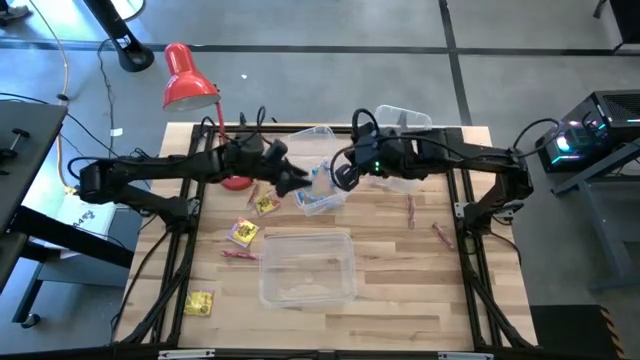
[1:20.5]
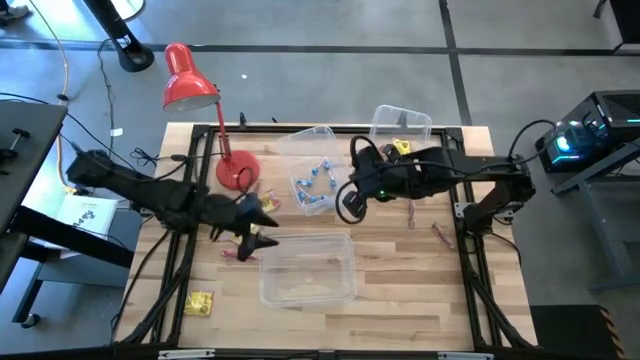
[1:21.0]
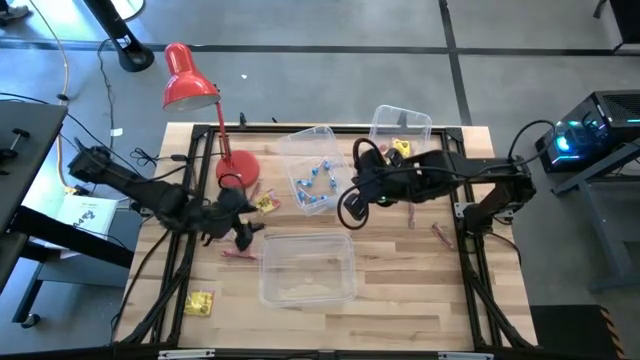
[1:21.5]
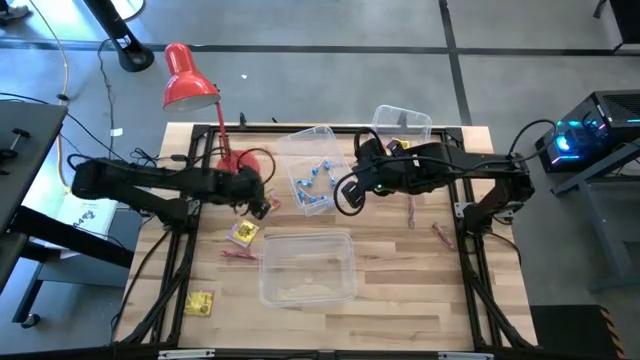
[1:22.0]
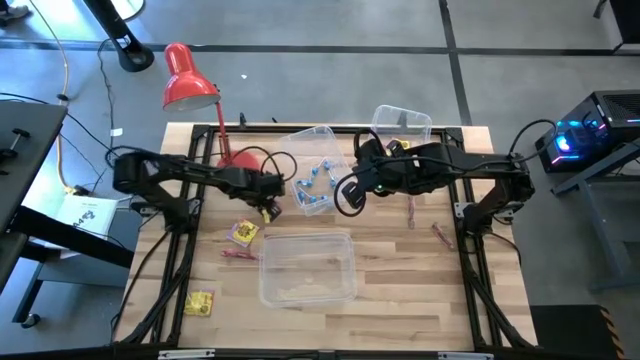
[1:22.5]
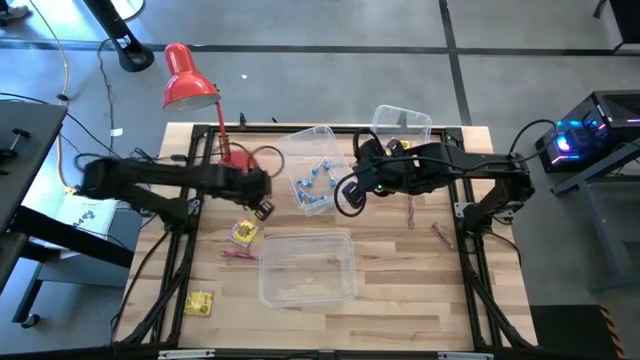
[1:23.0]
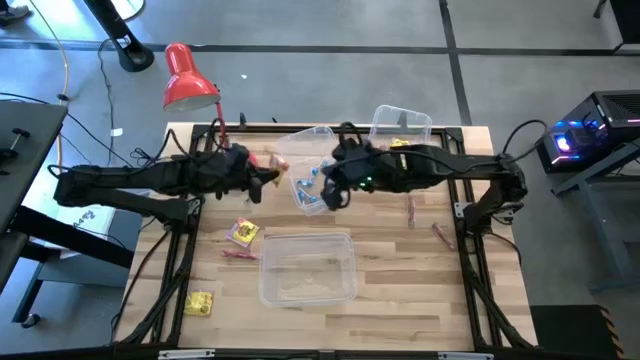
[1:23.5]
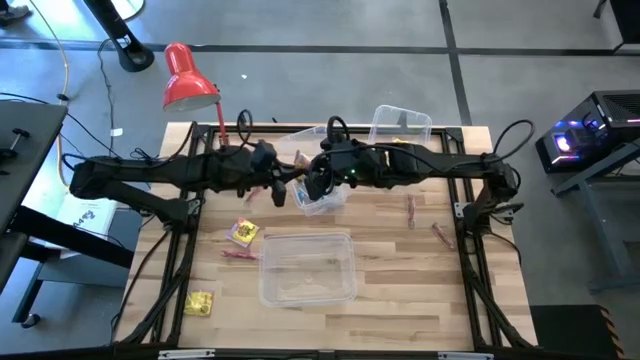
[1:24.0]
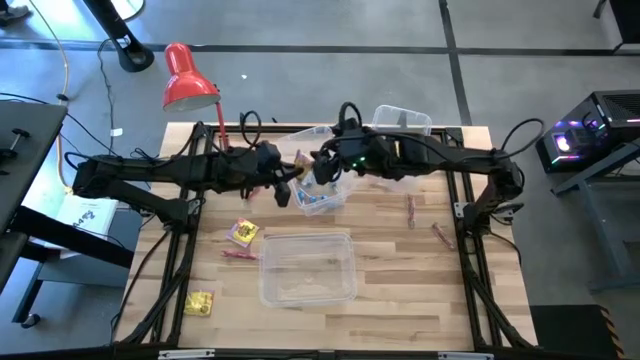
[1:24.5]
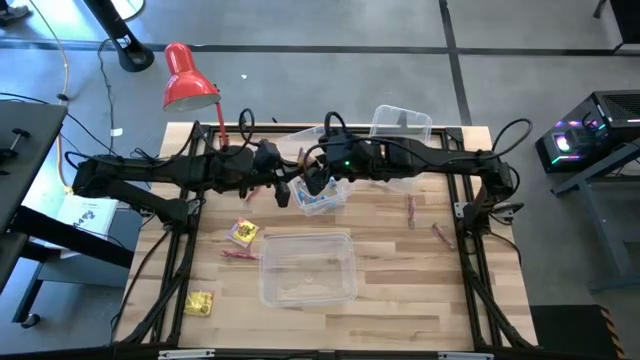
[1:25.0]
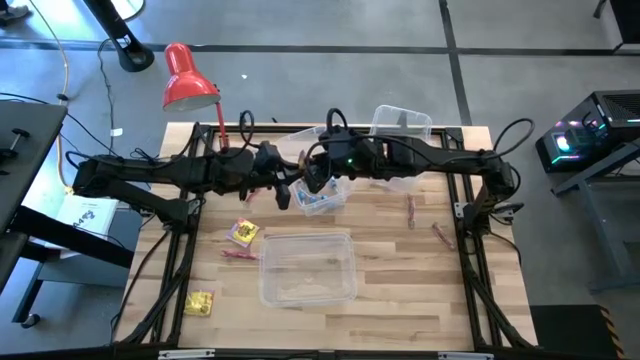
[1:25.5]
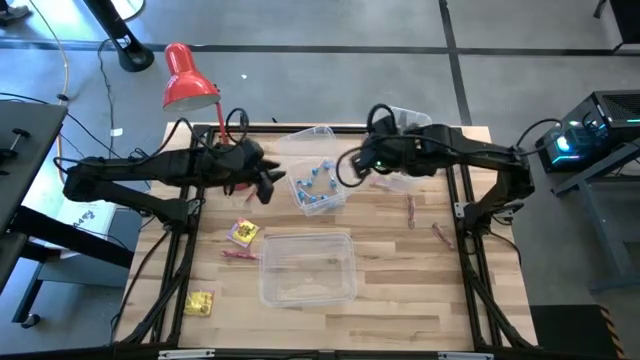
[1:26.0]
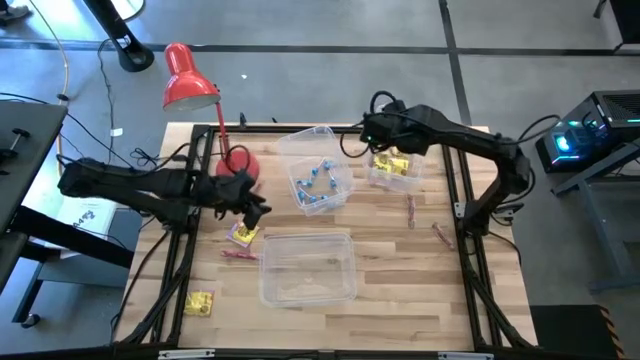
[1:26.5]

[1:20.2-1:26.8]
Task: Sort candy
Put the yellow candy into the top right transparent bin

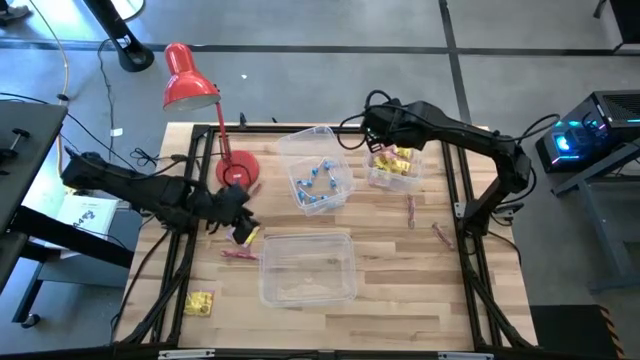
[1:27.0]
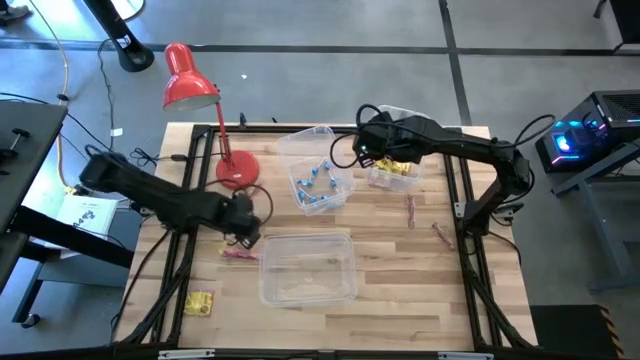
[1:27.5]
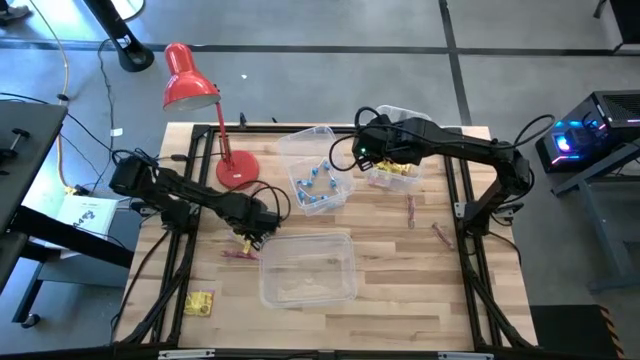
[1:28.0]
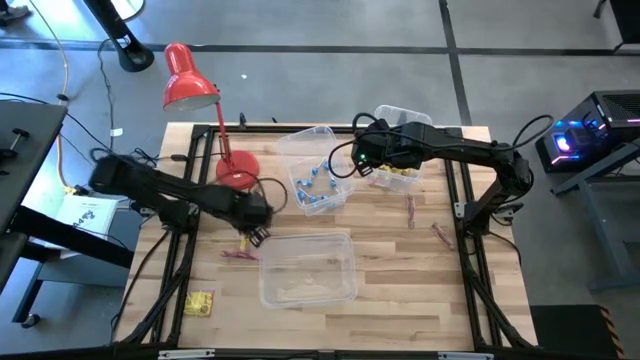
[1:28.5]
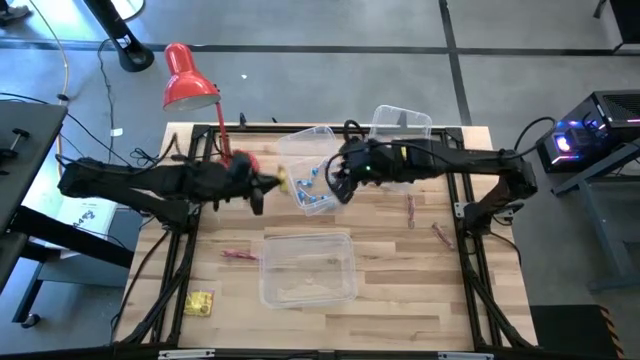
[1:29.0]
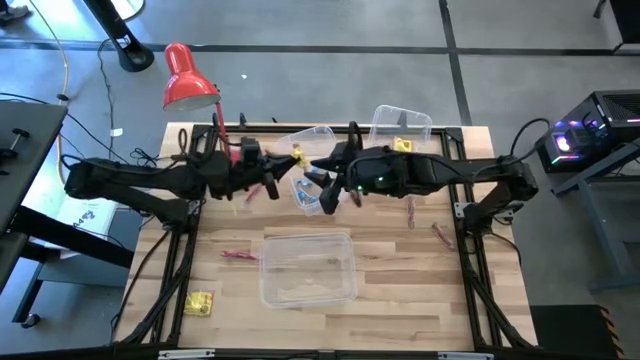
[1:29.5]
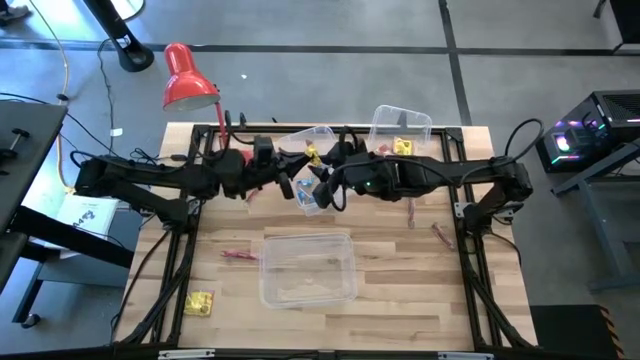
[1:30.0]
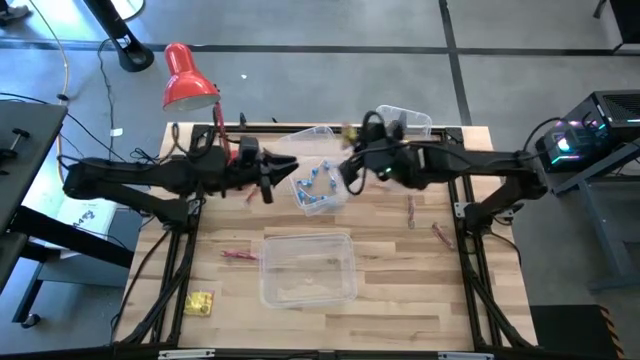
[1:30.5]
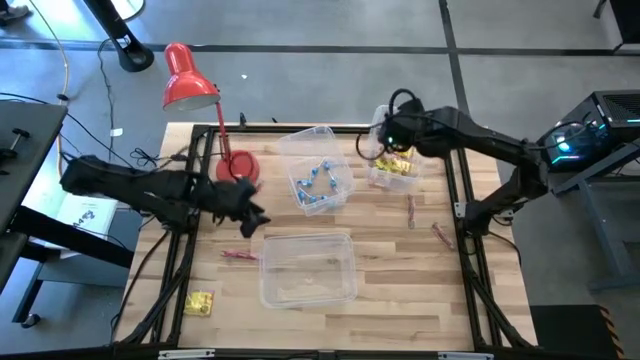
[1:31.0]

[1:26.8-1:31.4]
Put the yellow candy into the top right transparent bin

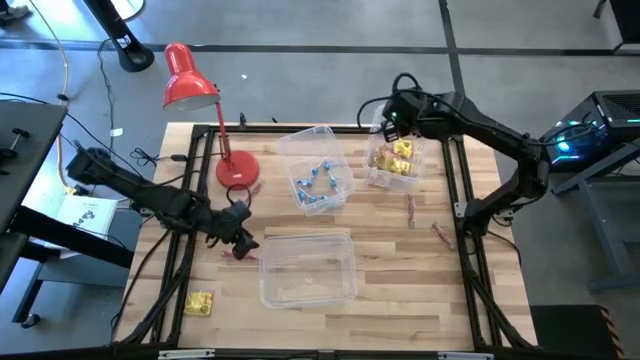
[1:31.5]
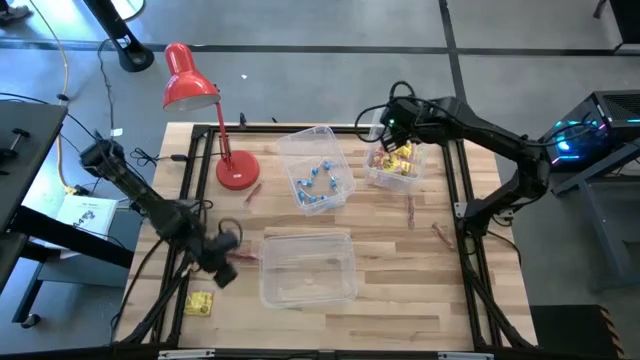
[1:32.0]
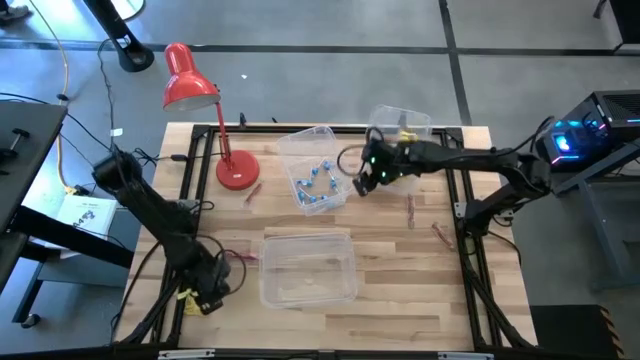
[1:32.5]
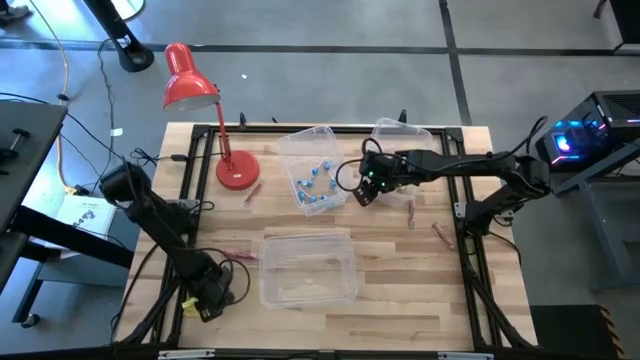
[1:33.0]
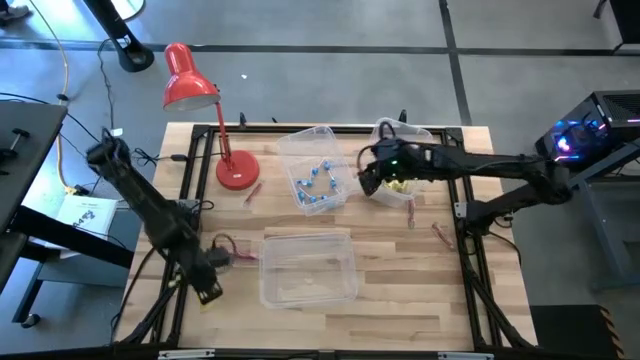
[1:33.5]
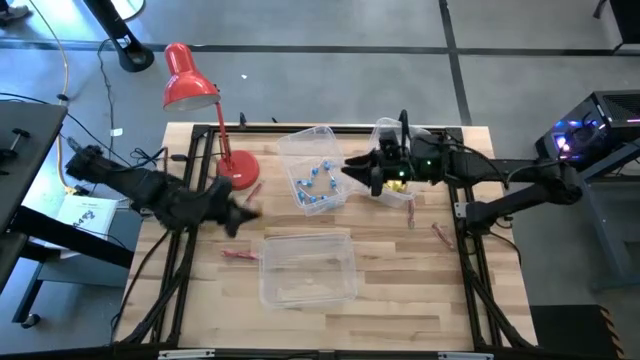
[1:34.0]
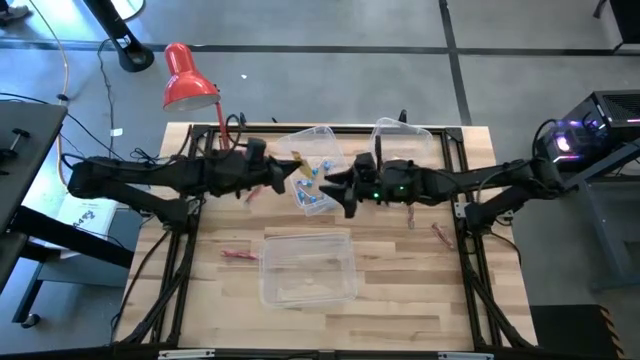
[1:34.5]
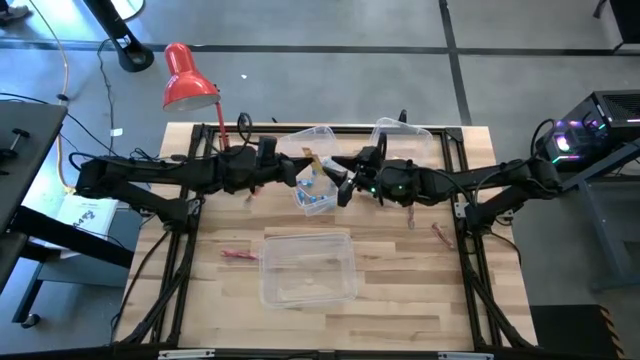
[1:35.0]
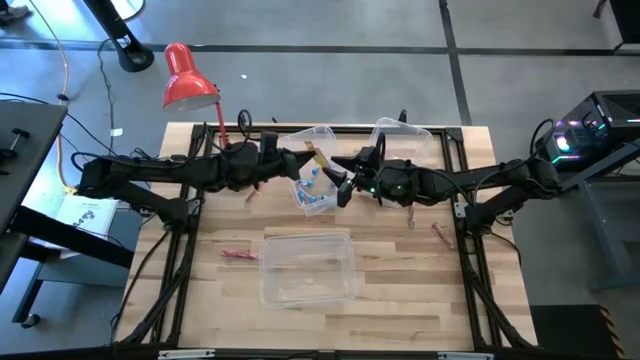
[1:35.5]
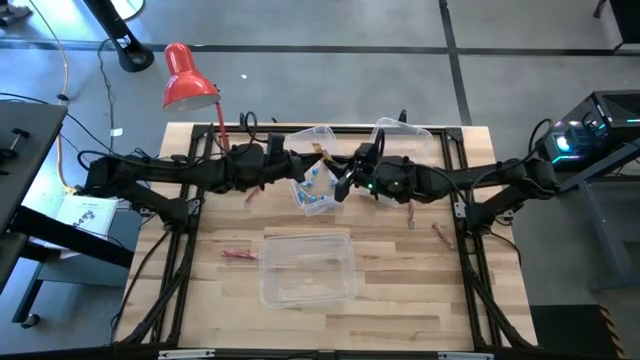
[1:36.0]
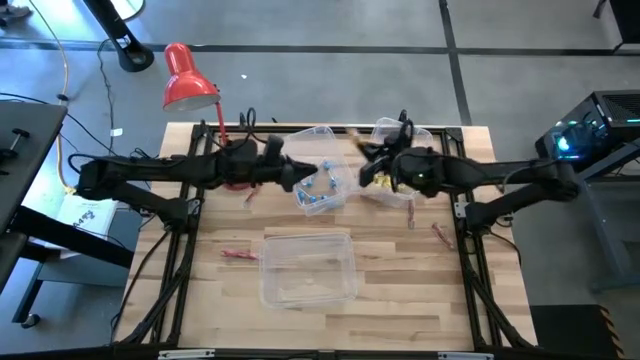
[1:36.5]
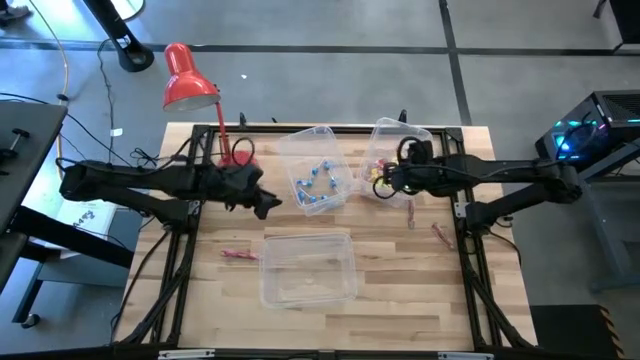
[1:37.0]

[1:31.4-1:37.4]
Put the yellow candy into the top right transparent bin

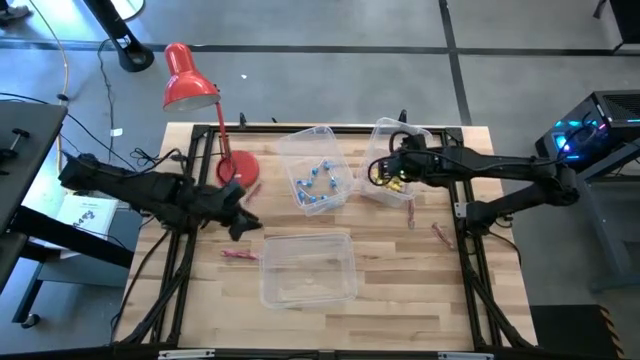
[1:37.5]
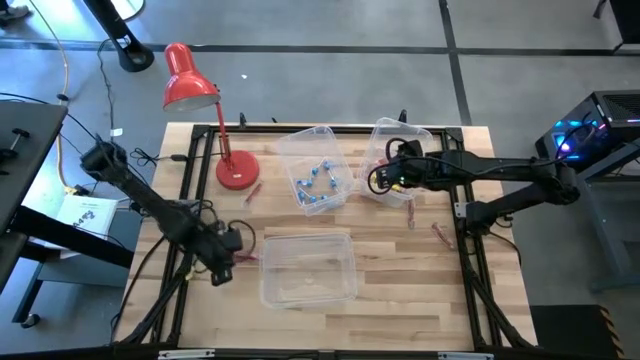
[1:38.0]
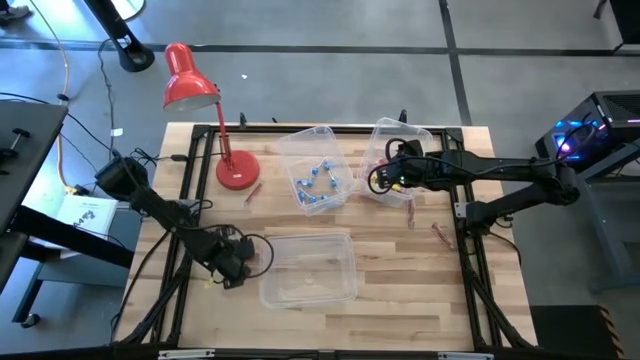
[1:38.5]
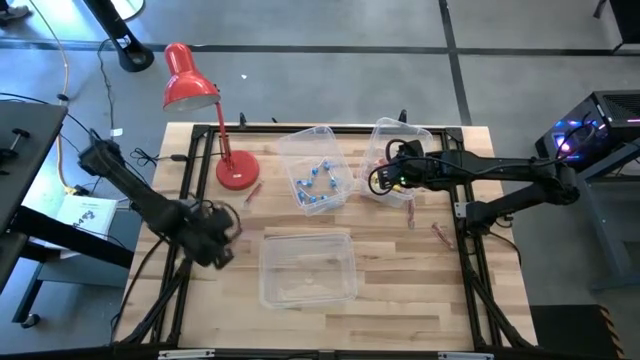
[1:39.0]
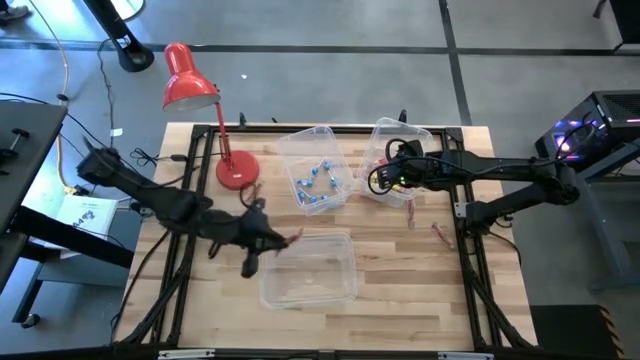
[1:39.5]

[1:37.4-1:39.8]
Put the red gummy into the bottom transparent bin

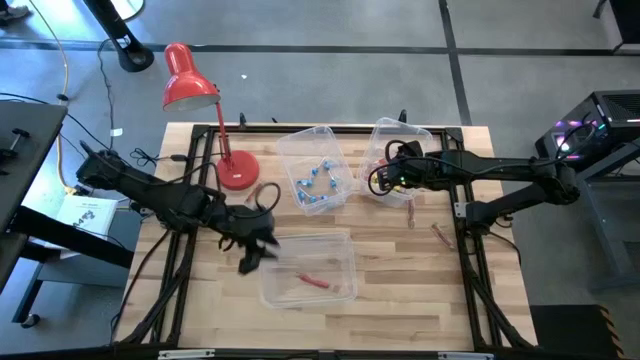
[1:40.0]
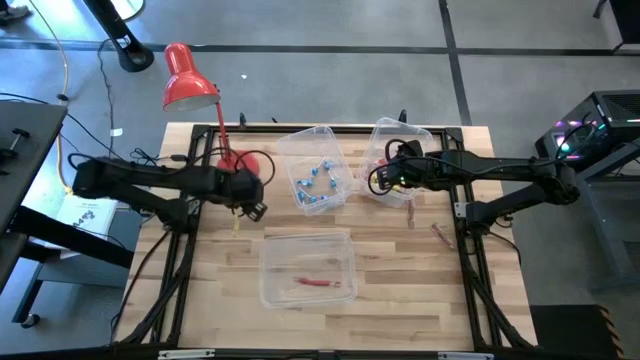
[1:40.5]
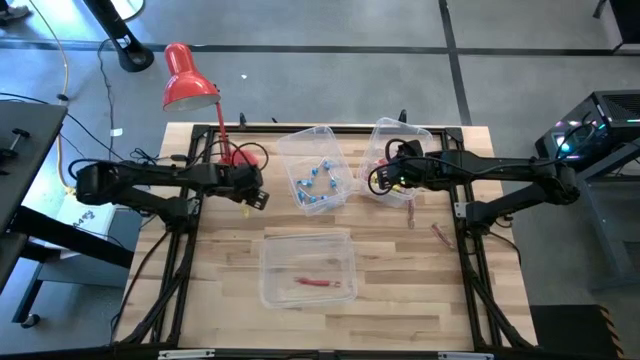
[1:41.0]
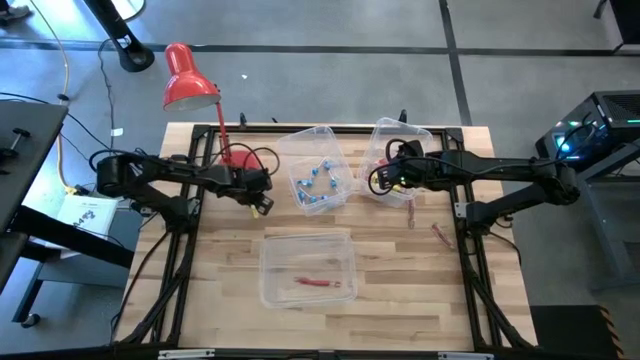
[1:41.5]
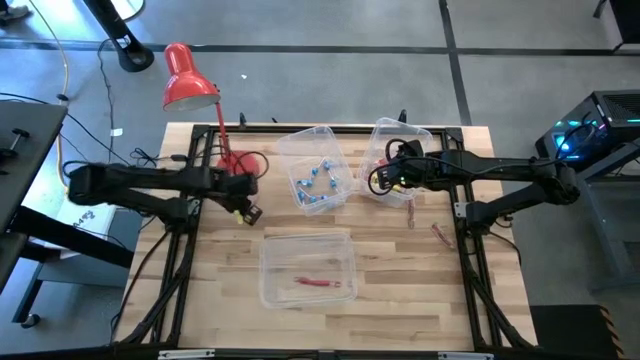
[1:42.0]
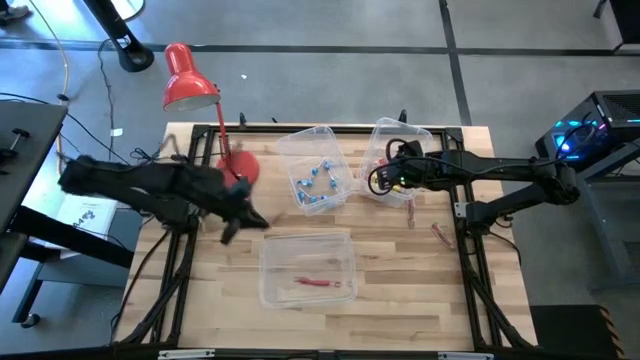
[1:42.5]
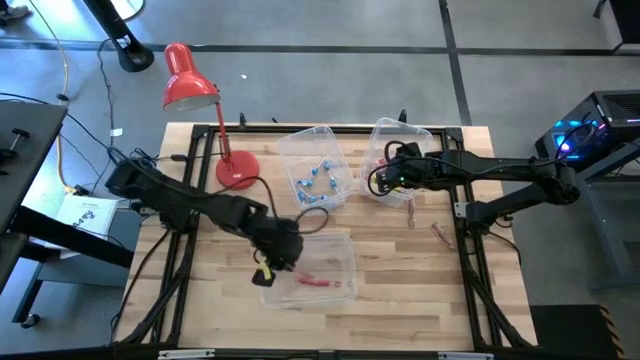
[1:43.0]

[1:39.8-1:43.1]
Put the red gummy into the bottom transparent bin
